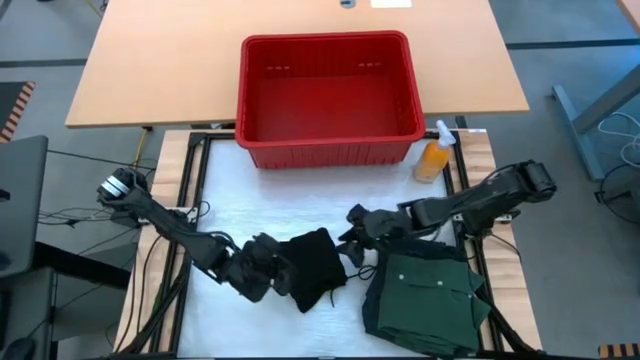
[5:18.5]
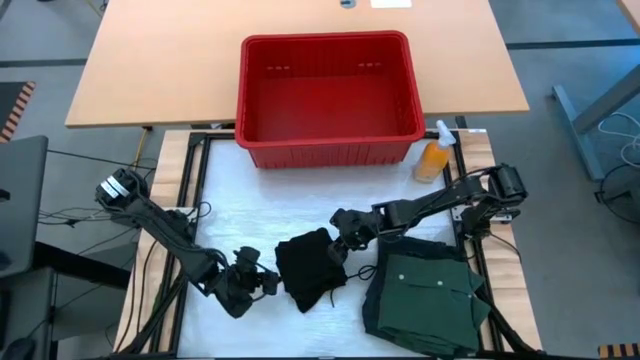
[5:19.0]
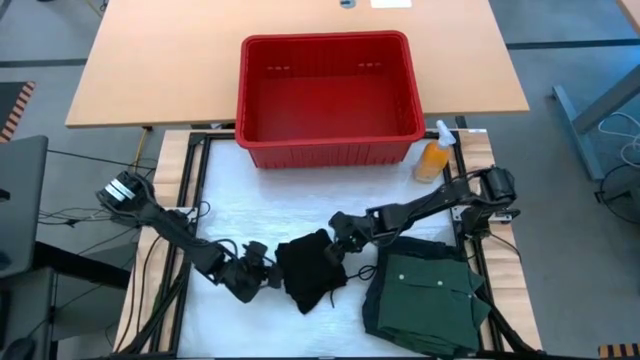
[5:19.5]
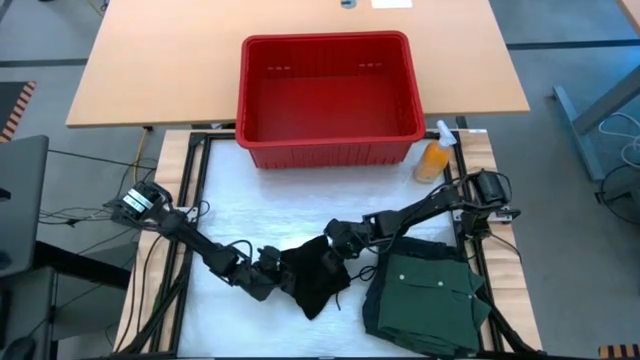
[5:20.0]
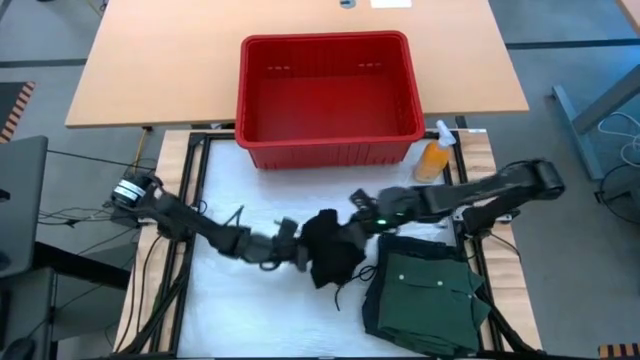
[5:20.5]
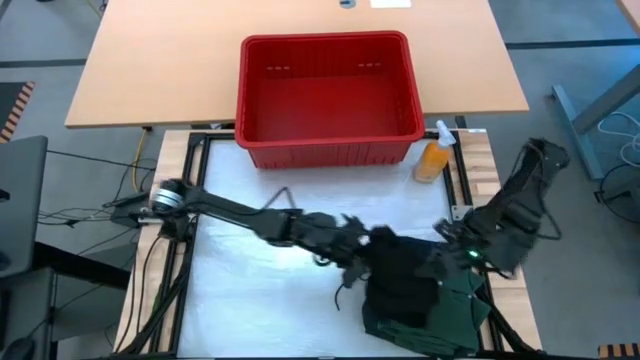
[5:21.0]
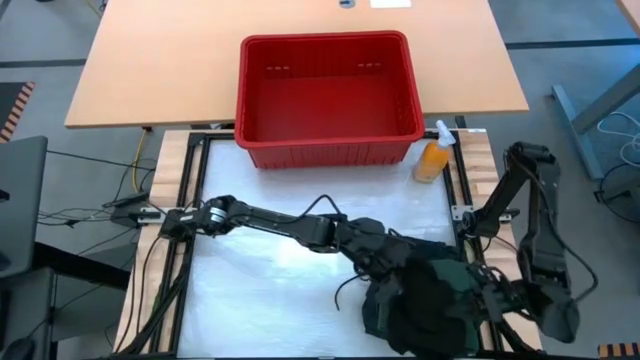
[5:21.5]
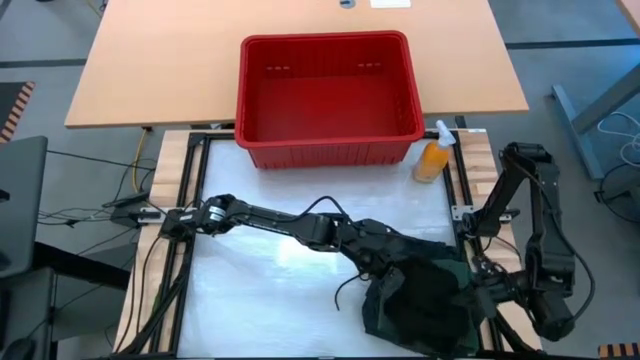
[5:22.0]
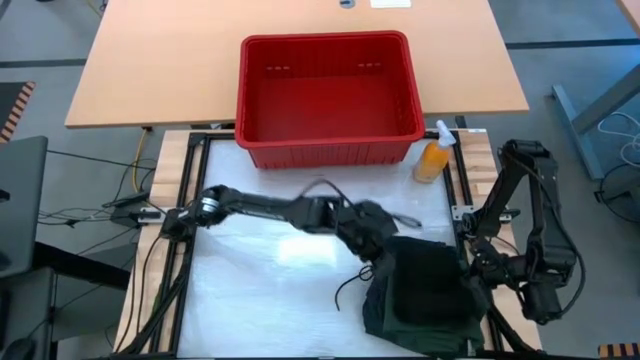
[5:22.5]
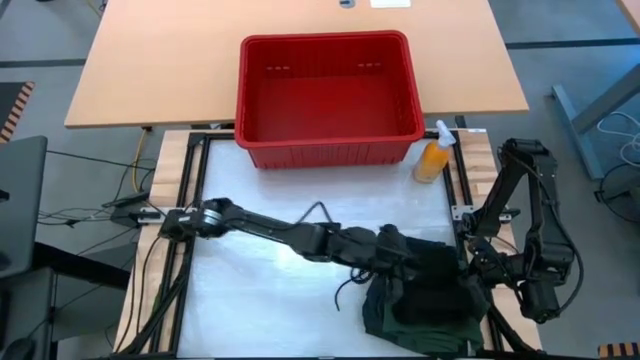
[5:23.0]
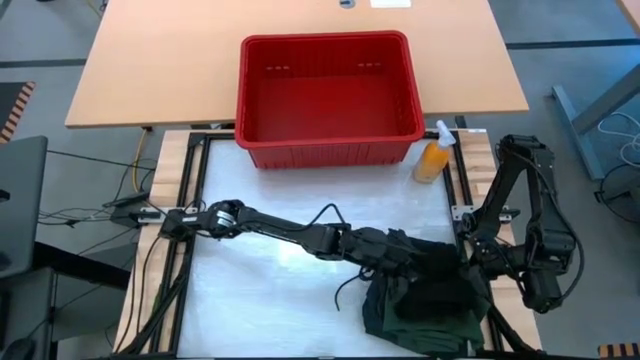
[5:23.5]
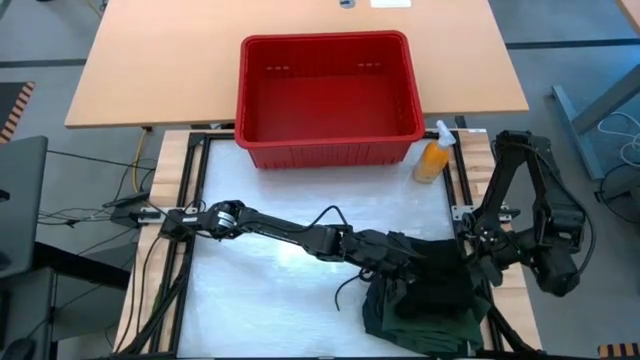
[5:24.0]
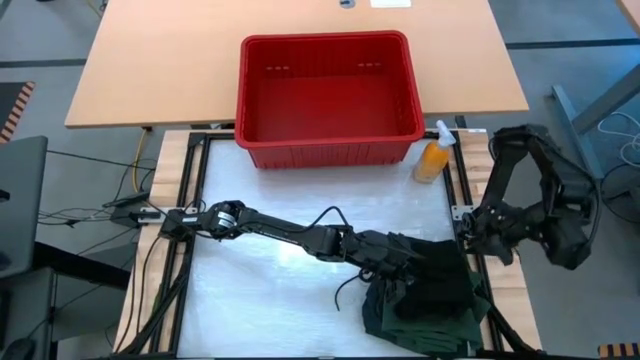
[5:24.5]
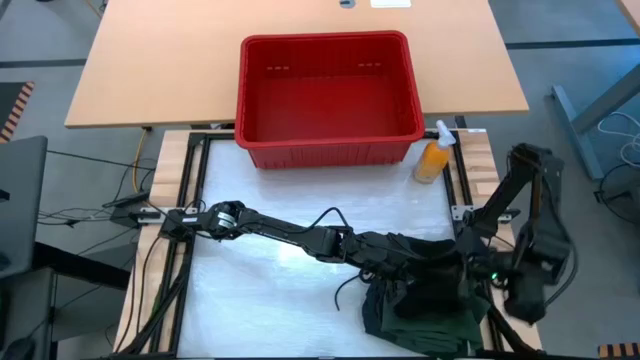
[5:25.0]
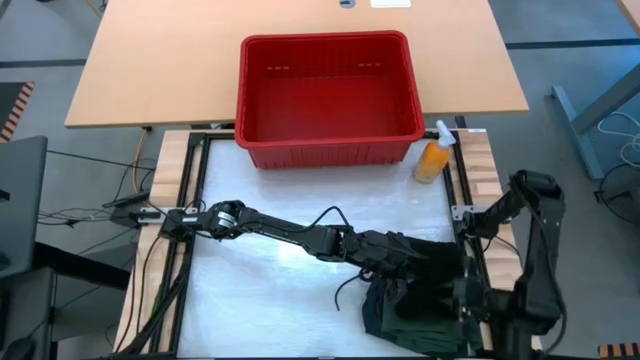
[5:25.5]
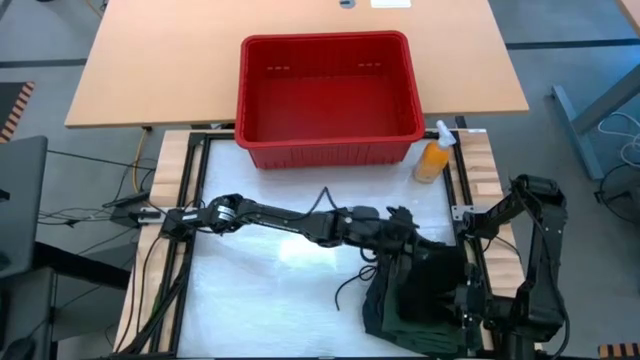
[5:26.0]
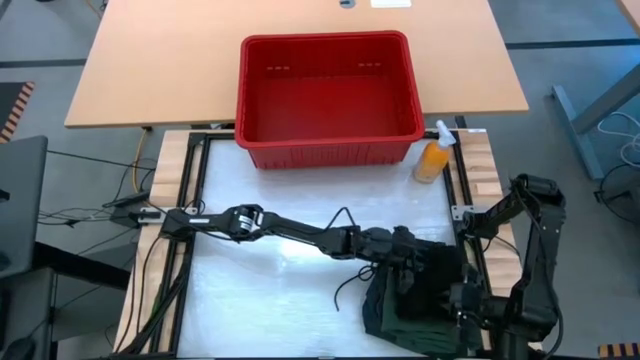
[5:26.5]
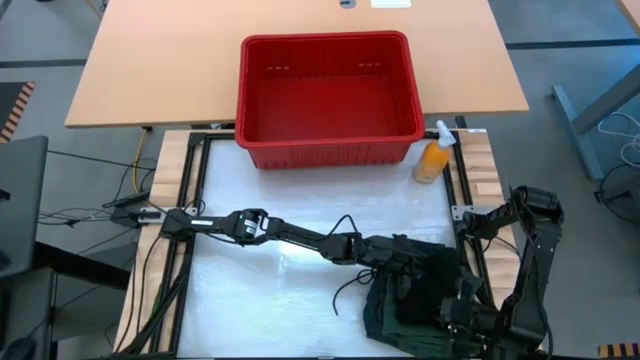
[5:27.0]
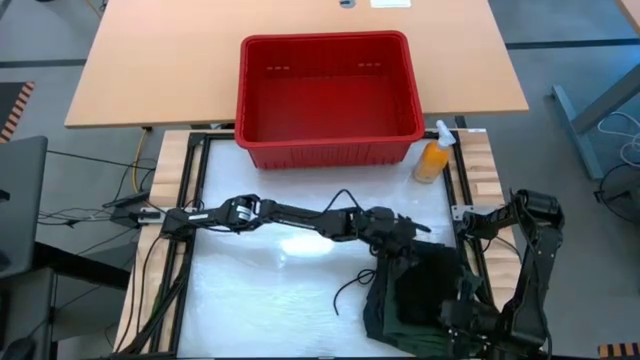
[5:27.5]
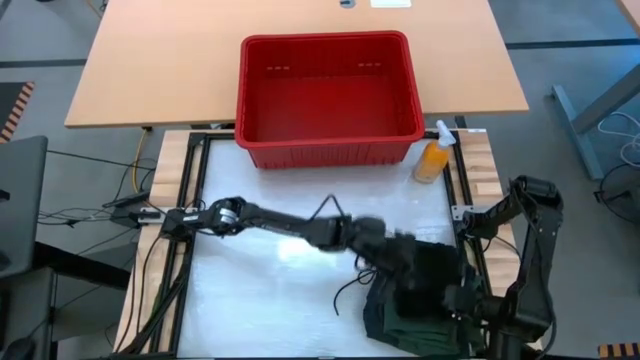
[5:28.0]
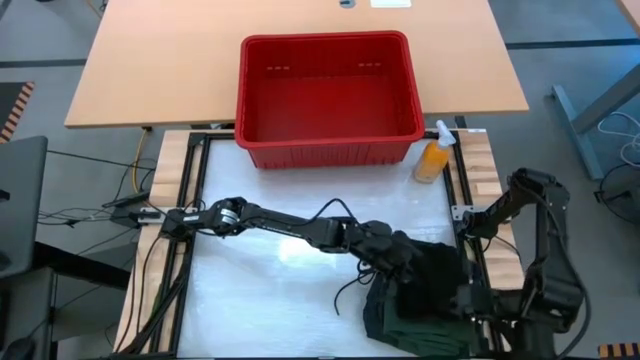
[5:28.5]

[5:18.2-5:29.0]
Task: Fold laundry
Stack the folded black shirt on top of the folded green shirt

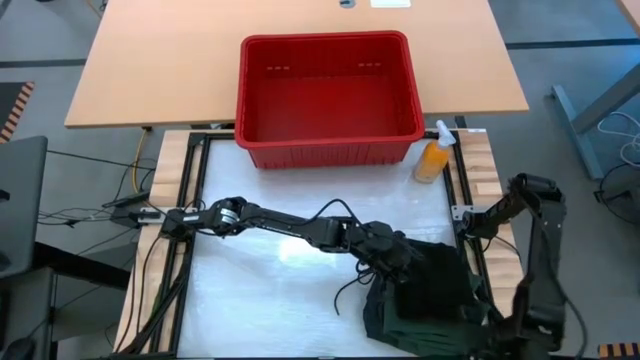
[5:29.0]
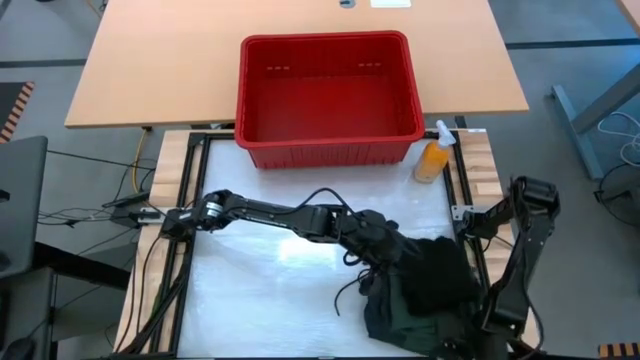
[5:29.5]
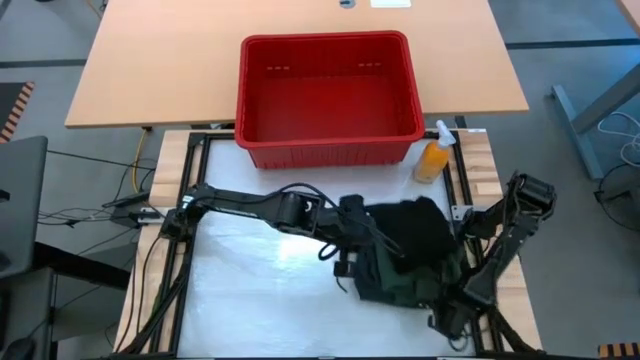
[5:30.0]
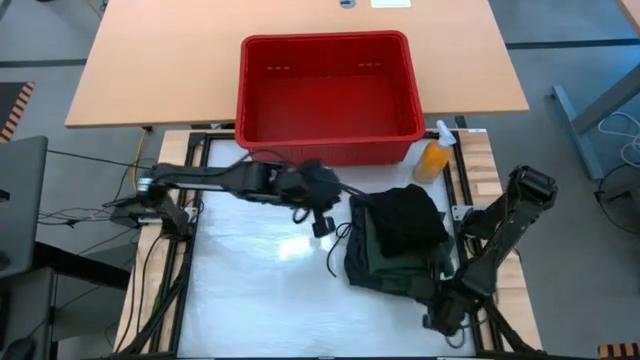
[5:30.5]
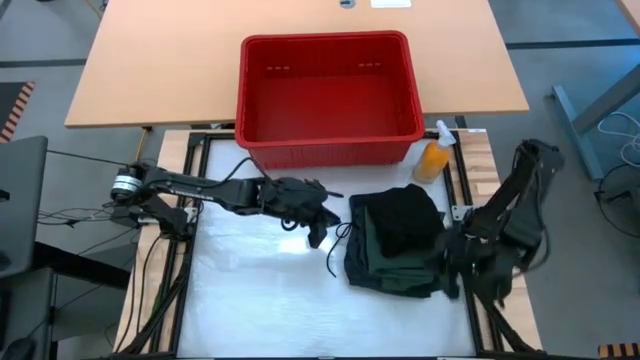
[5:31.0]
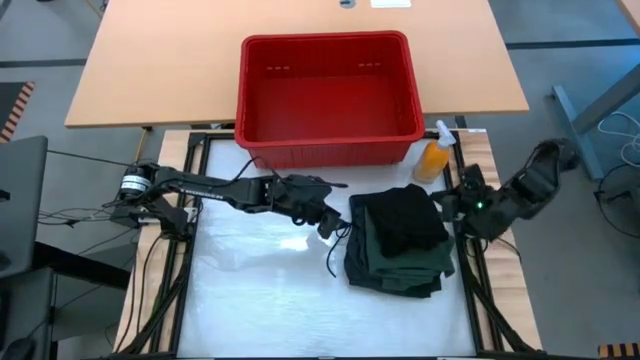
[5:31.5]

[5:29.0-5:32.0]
Move the stacked clothes to the middle

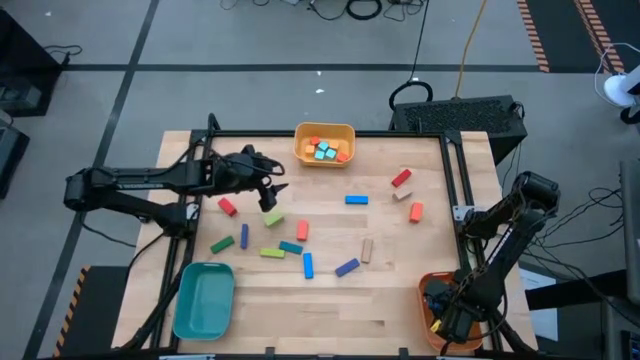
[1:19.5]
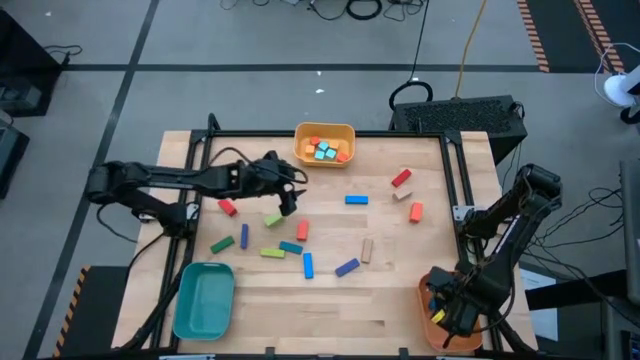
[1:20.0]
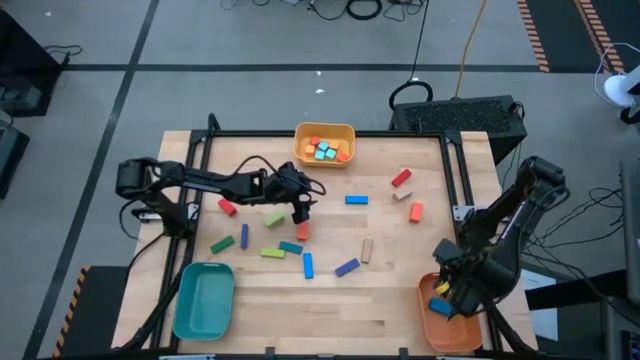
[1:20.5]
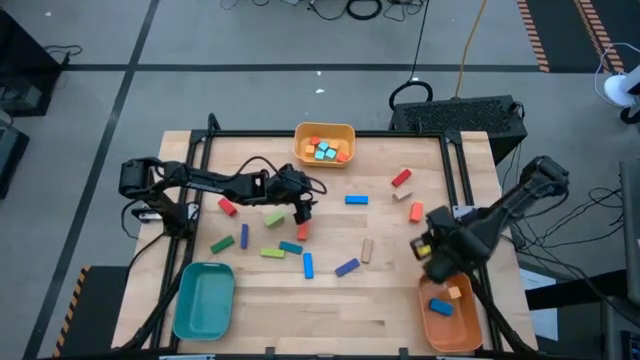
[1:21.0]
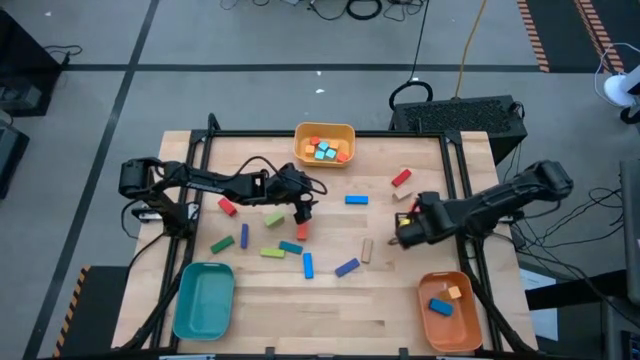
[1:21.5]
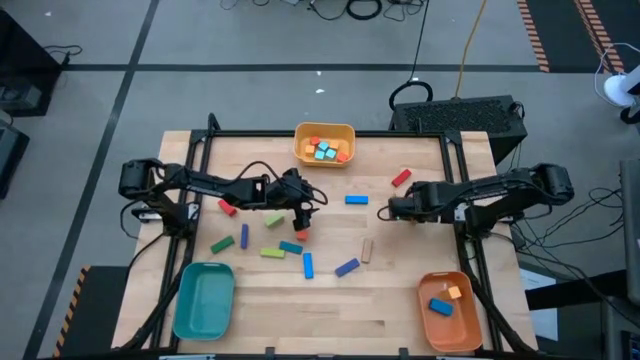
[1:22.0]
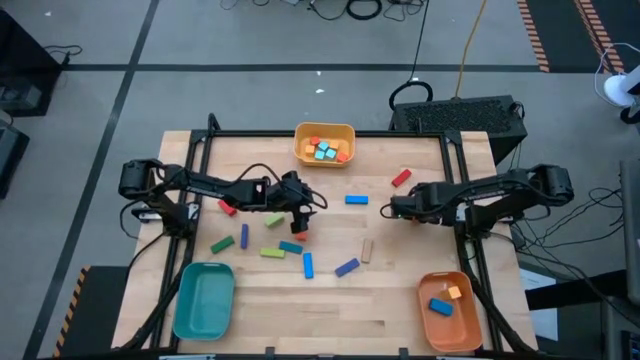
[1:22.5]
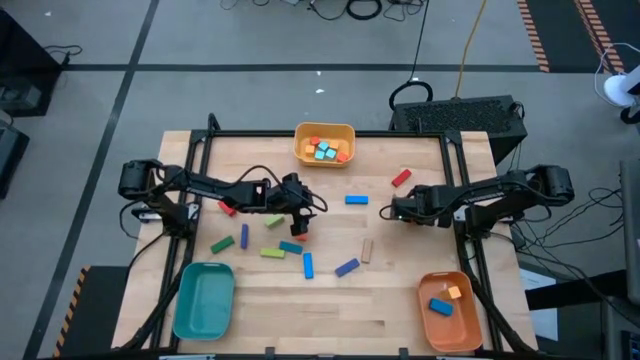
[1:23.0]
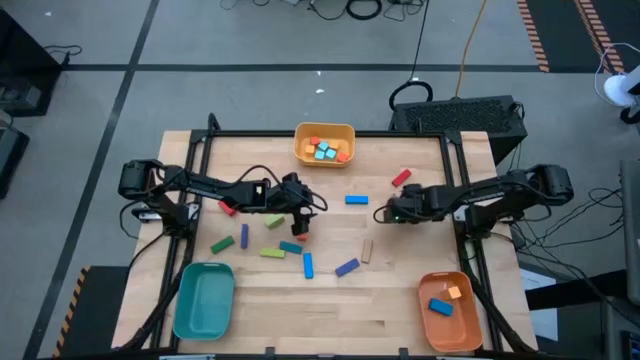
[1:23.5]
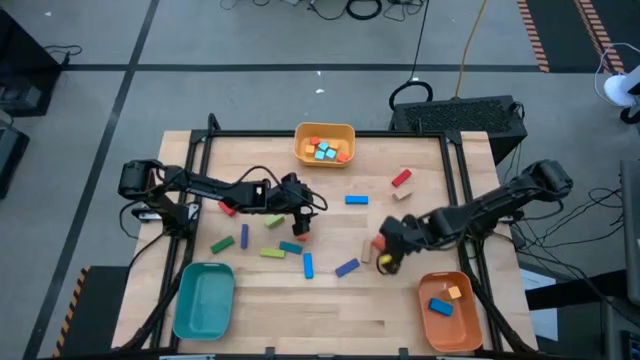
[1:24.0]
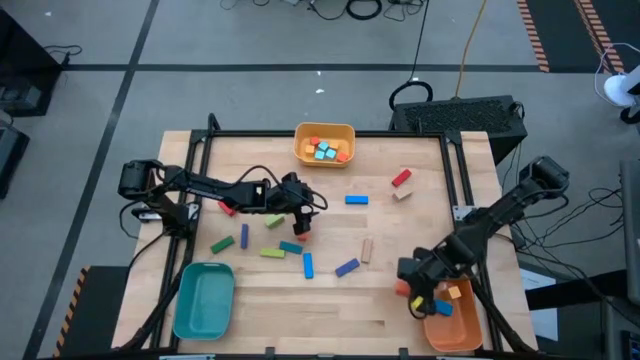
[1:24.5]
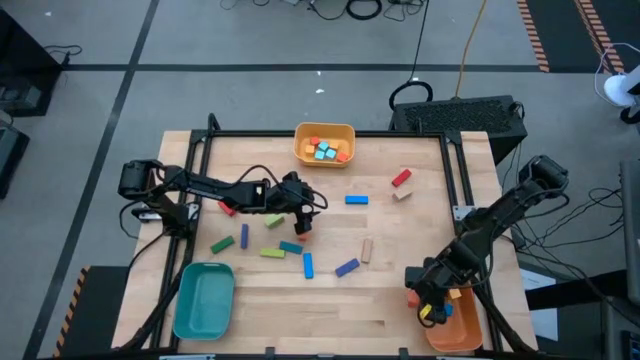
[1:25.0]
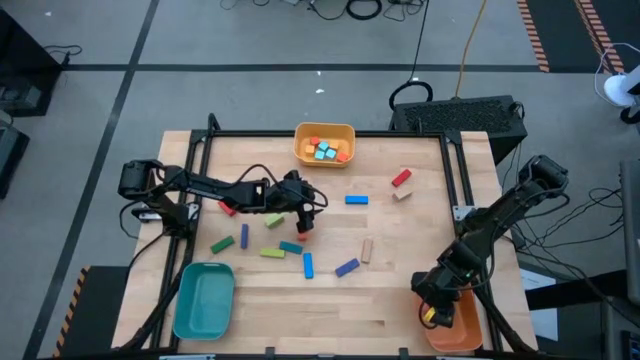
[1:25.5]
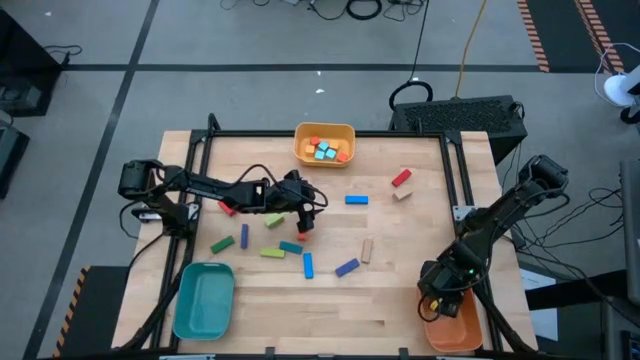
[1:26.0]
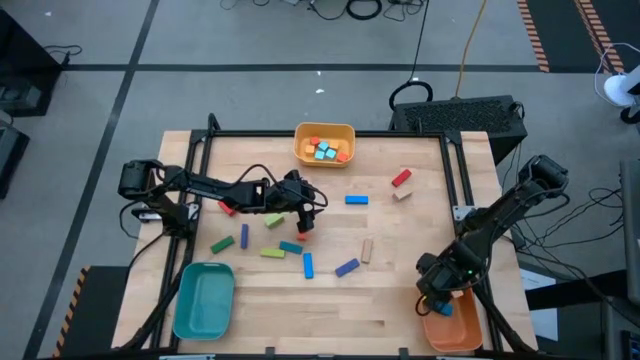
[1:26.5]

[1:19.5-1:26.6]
Task: Sort blocks by size
Put the right big orange rectangle block into the orange bin
